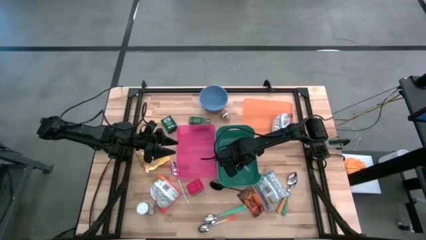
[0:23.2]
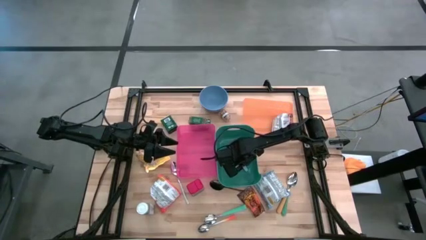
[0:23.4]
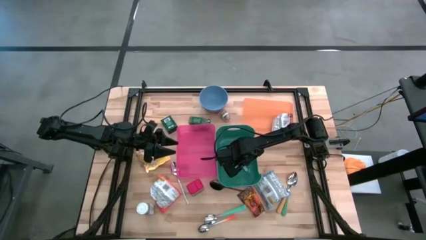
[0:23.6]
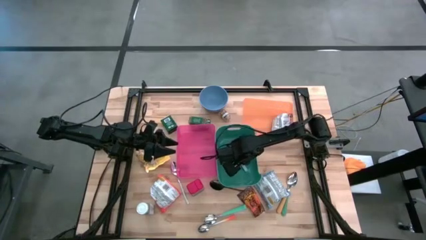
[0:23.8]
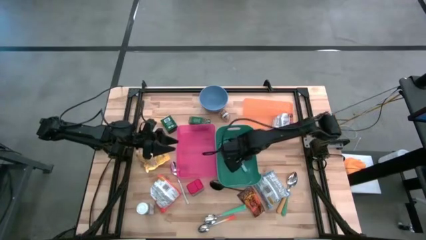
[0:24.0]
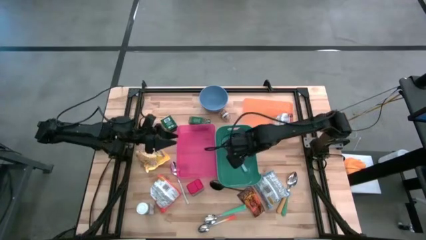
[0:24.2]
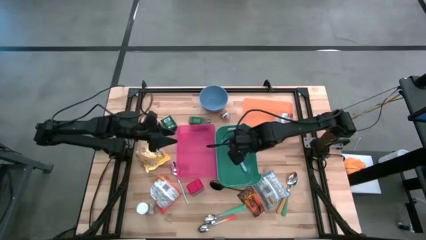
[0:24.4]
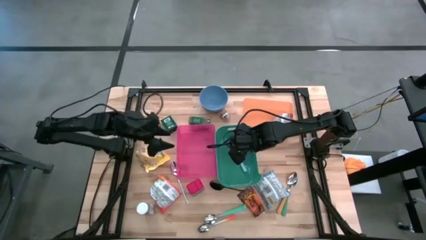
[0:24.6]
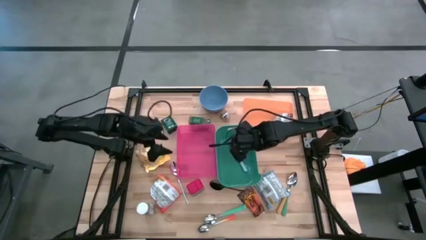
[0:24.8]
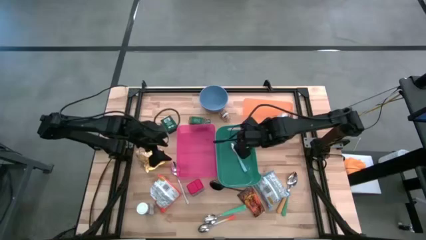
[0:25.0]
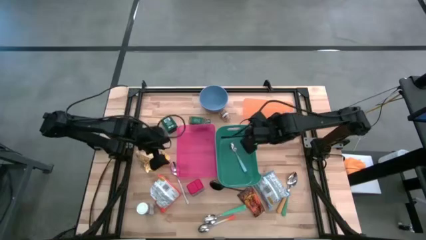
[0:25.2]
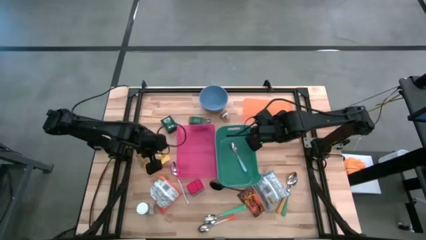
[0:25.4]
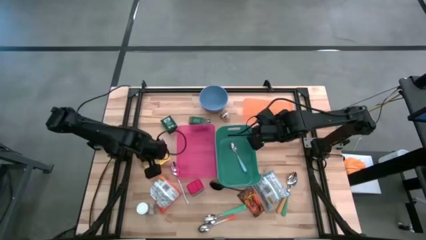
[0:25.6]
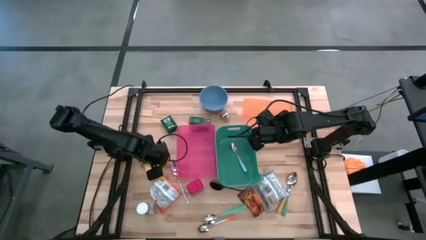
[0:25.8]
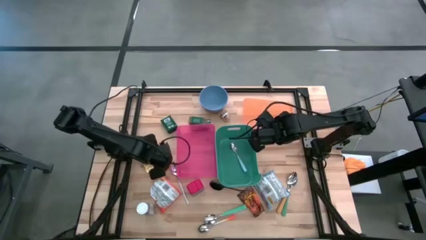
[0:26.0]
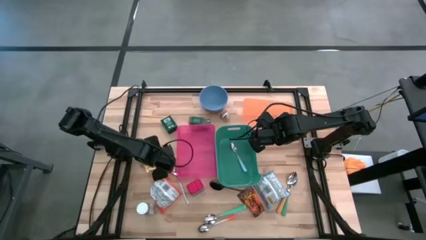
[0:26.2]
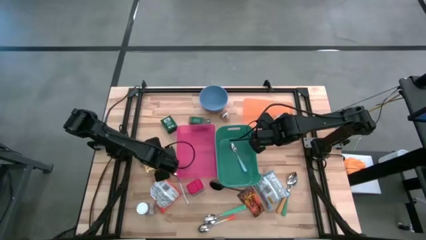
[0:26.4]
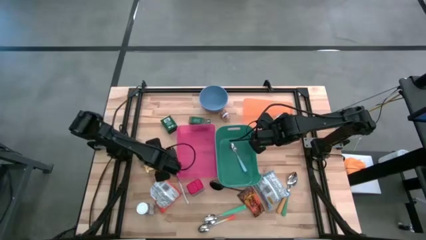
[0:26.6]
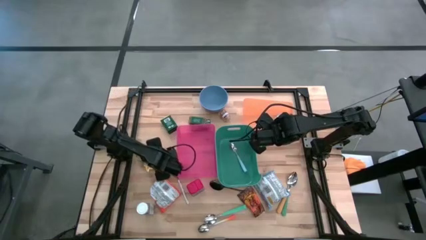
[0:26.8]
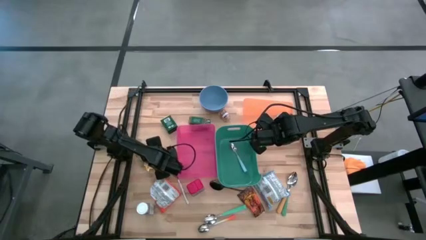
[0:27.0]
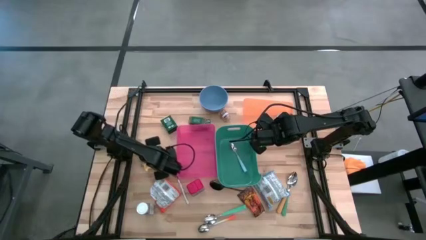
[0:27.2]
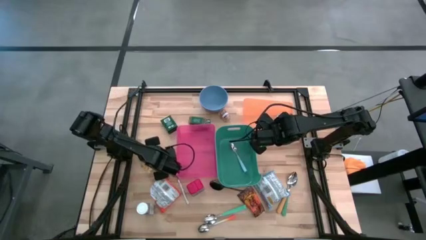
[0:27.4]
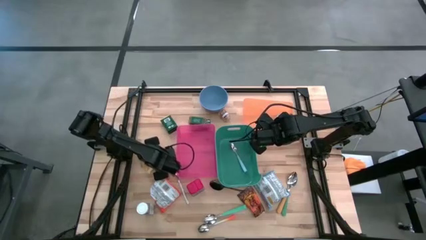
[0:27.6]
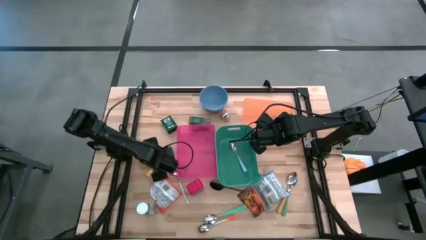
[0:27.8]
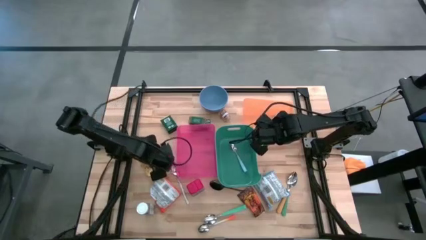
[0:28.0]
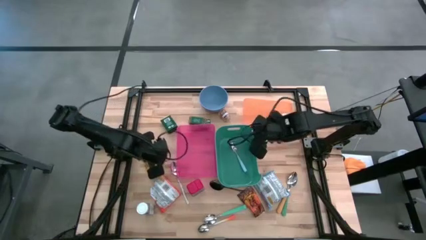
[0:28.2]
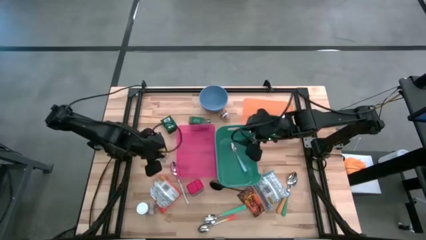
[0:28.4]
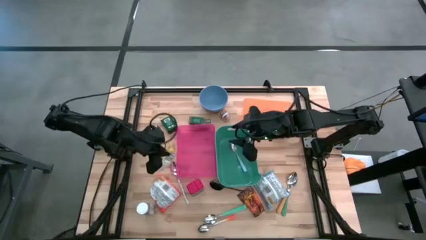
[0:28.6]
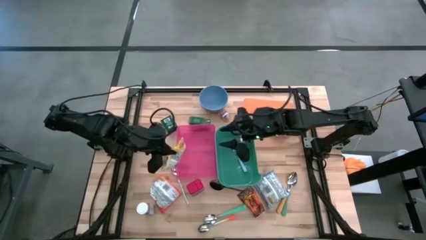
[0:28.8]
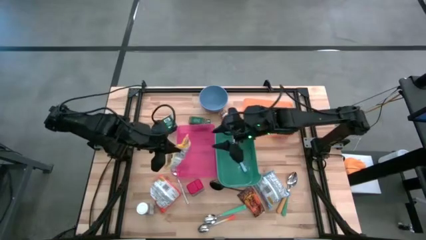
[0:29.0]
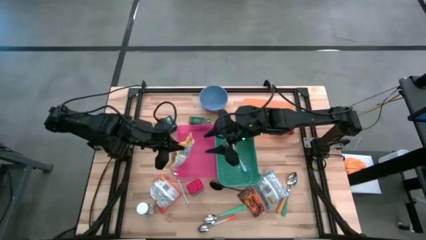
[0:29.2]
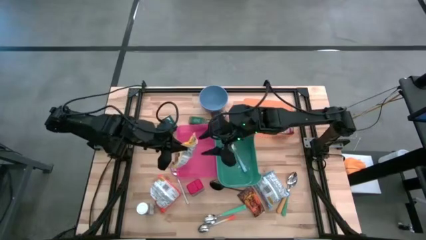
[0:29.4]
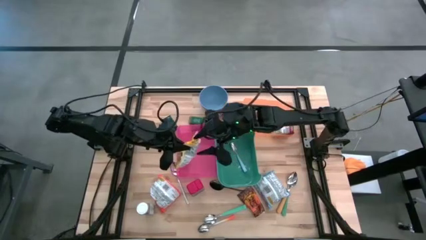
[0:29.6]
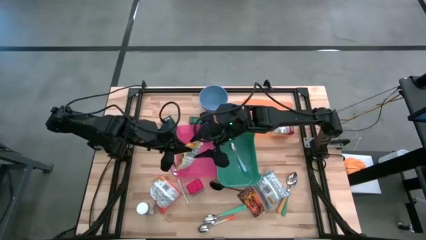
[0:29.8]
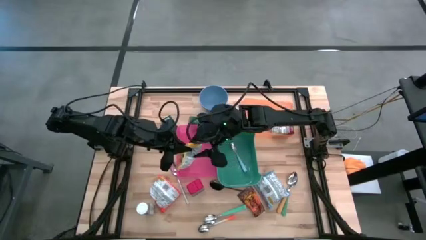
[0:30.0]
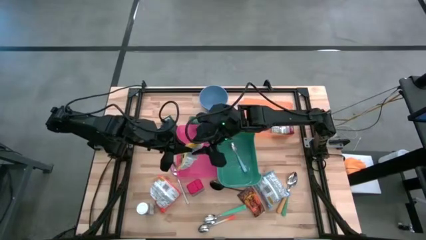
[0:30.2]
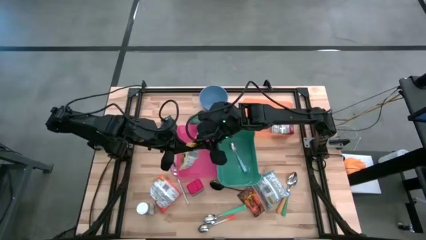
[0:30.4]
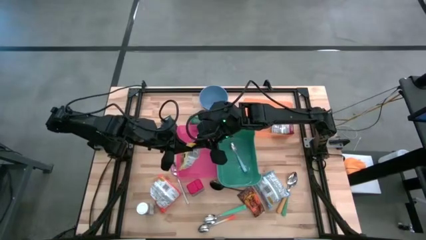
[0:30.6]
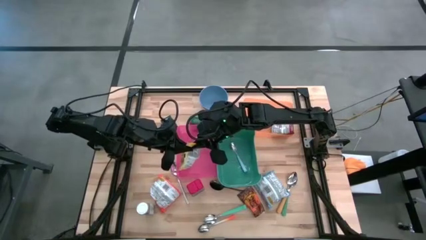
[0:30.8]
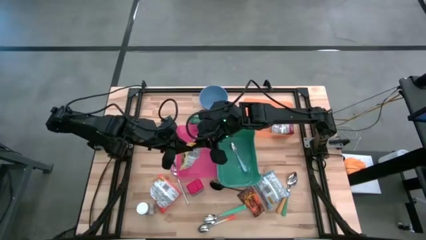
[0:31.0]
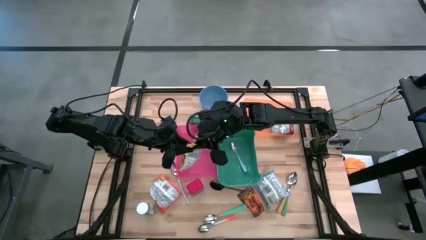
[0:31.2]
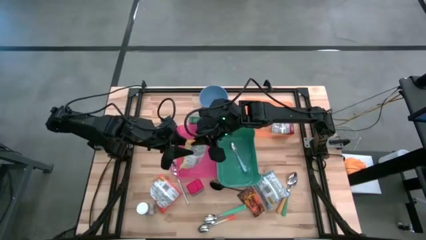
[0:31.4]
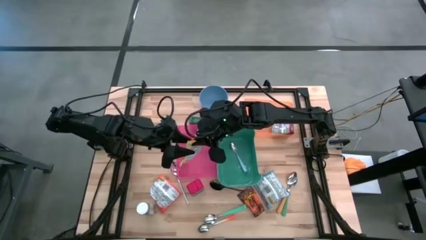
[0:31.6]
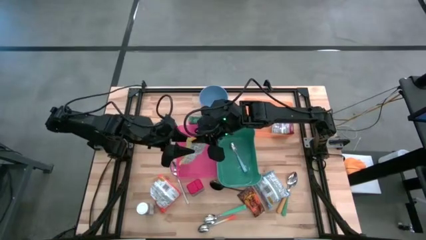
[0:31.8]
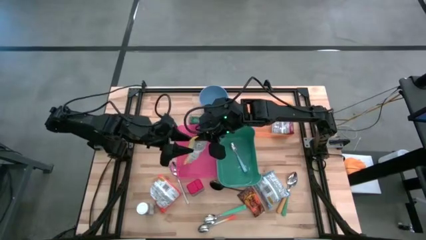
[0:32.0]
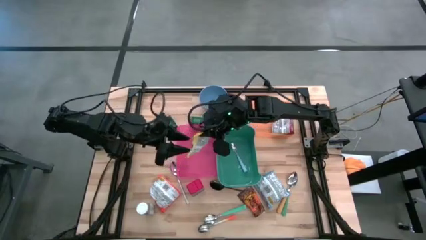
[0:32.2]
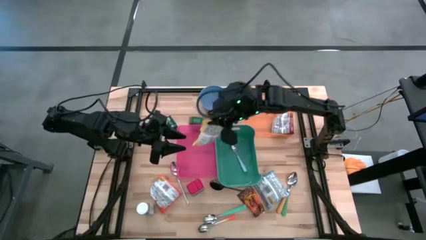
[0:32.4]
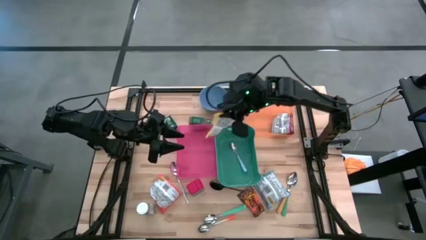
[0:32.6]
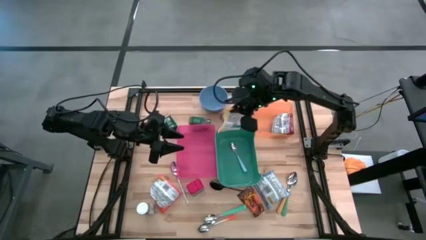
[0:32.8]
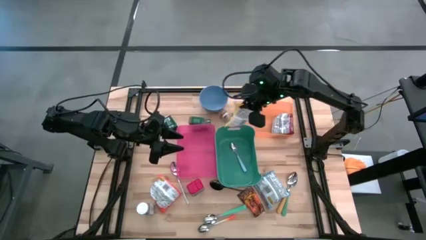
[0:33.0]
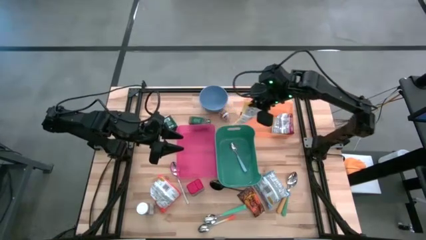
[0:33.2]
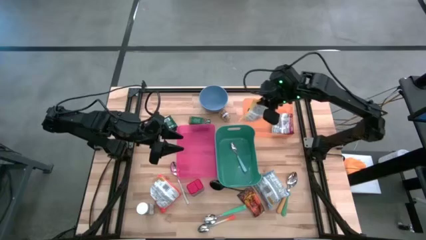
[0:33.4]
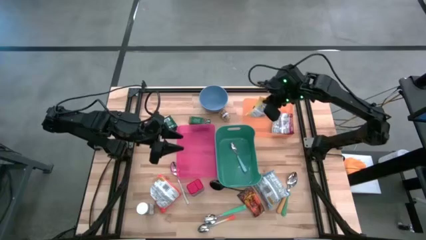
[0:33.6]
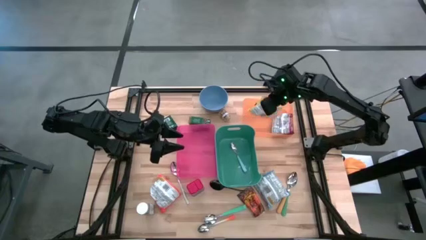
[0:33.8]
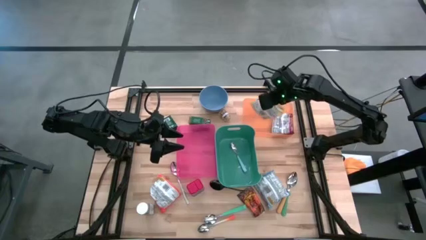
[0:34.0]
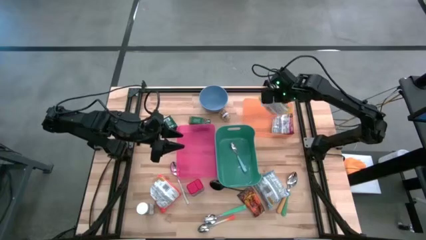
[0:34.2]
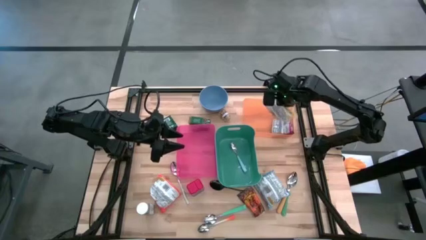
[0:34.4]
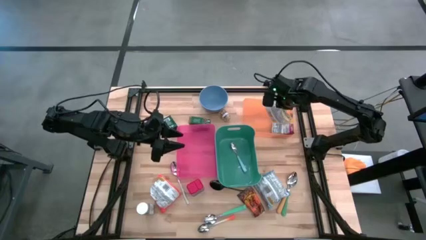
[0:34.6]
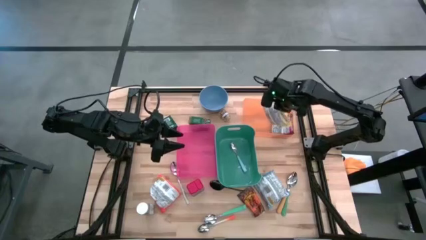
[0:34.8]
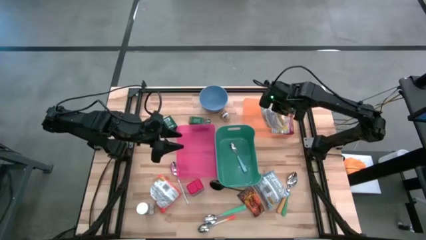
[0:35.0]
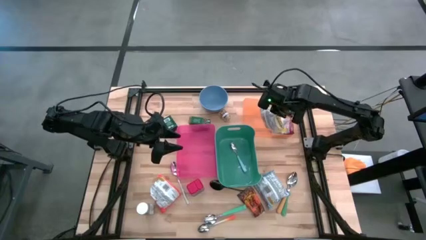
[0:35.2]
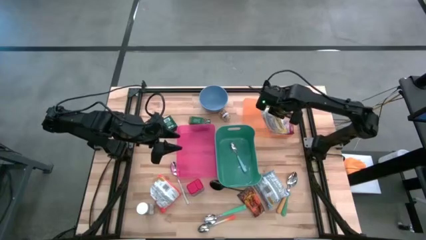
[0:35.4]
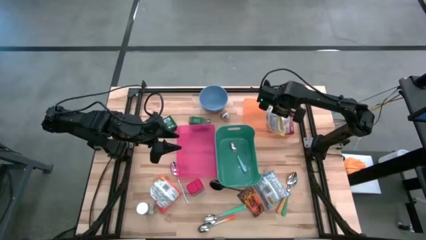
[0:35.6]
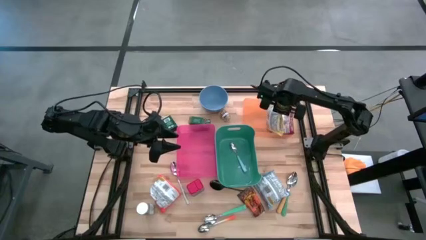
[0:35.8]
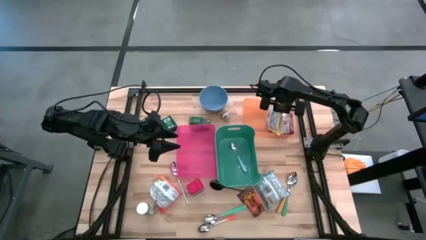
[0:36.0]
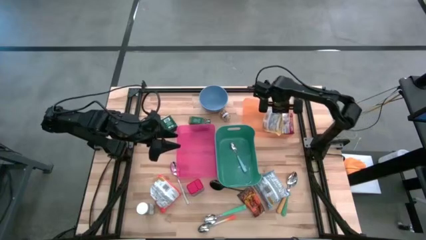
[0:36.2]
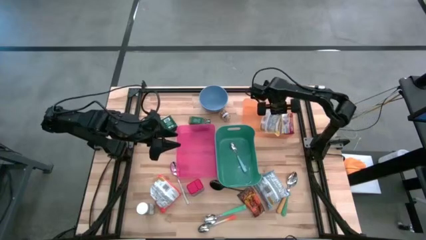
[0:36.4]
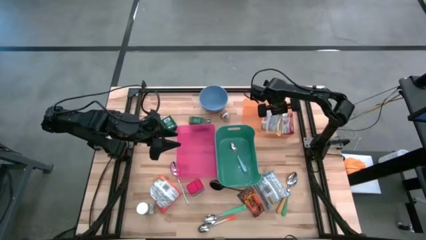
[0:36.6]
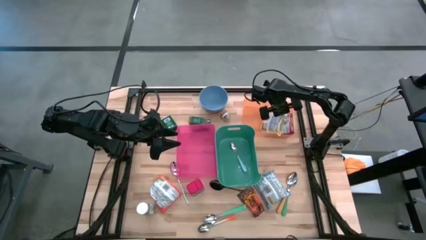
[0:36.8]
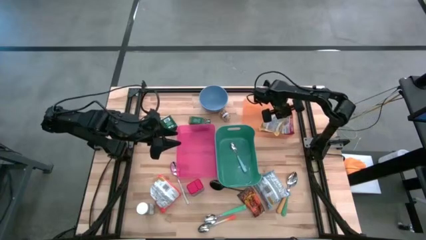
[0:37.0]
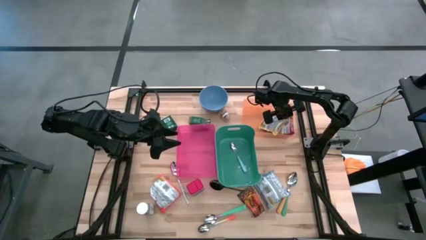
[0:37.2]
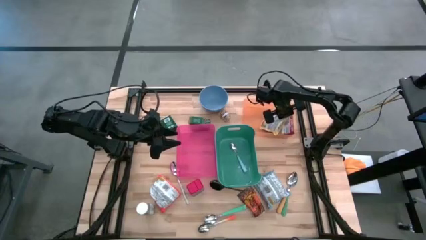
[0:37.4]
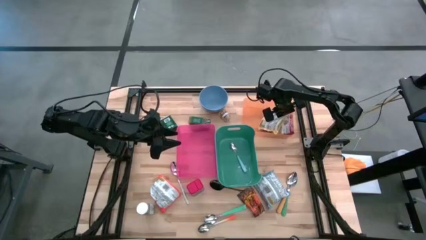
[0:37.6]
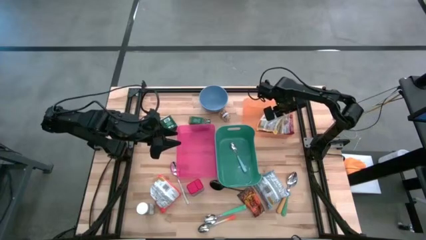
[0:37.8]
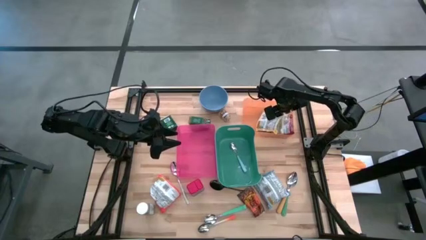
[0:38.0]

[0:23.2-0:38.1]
Put the yellow noodle pack into the orange bin
